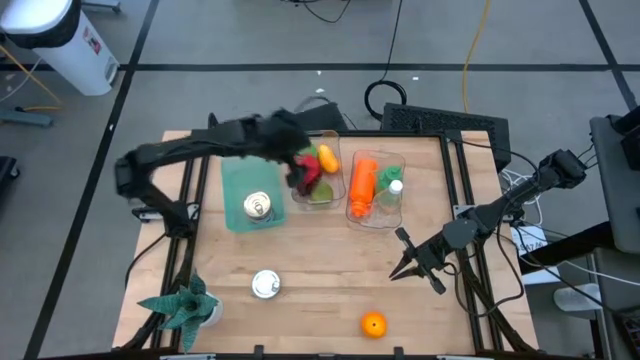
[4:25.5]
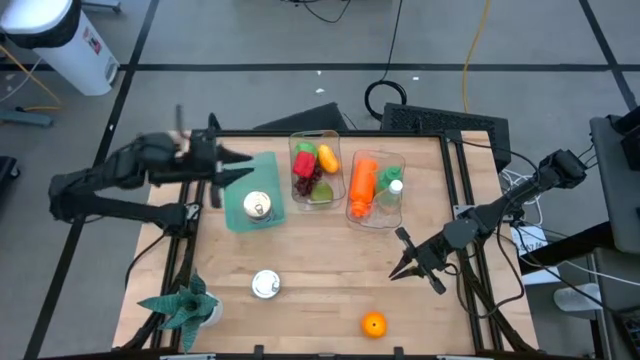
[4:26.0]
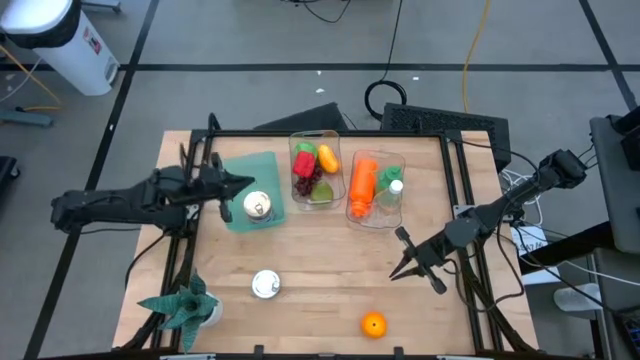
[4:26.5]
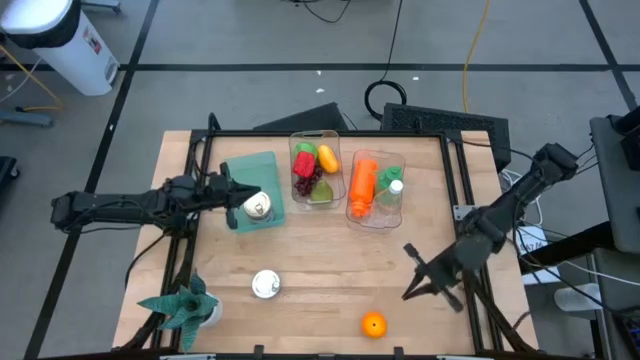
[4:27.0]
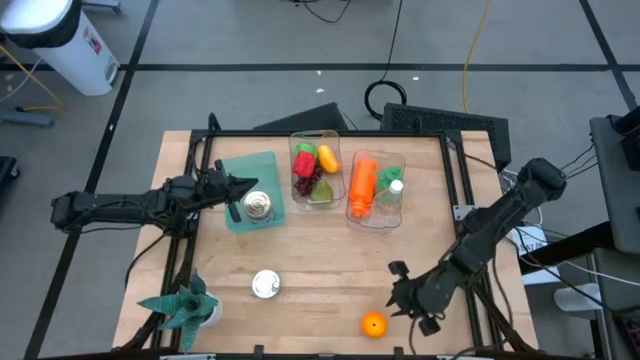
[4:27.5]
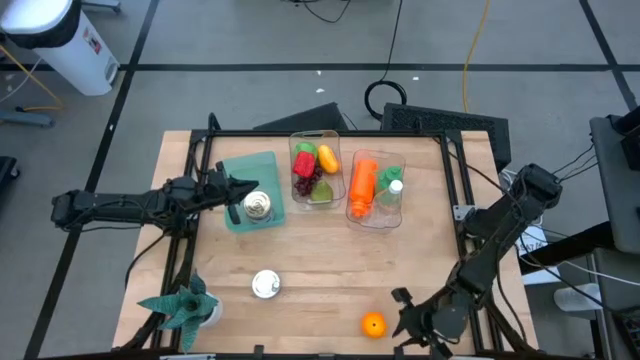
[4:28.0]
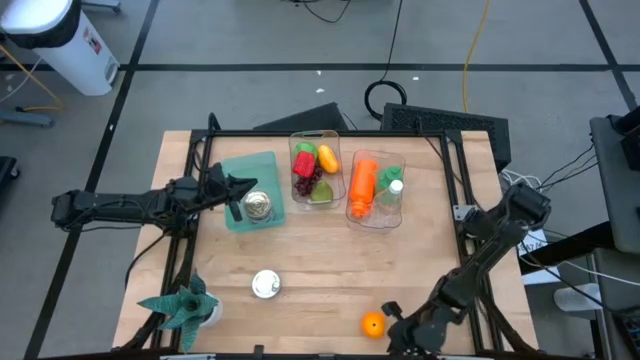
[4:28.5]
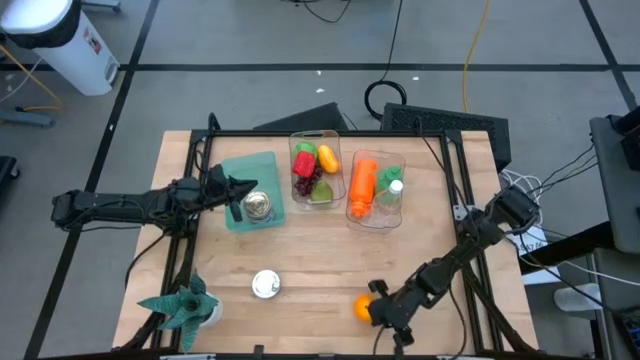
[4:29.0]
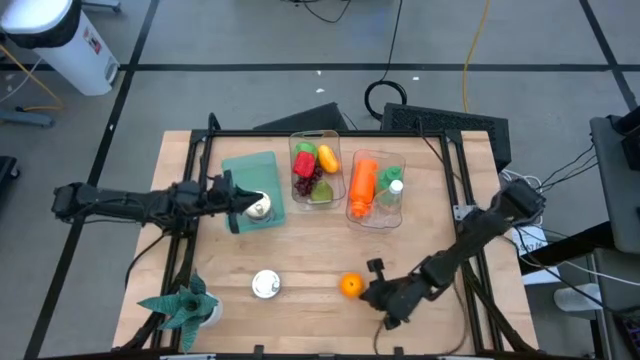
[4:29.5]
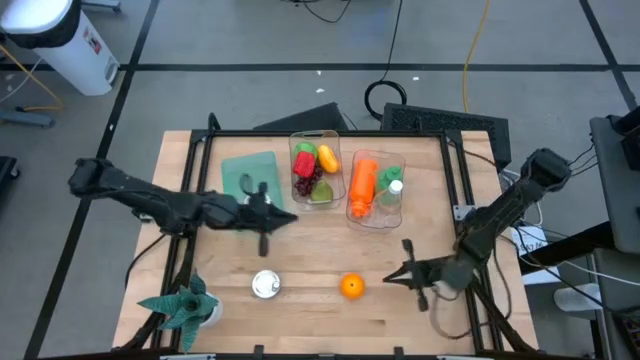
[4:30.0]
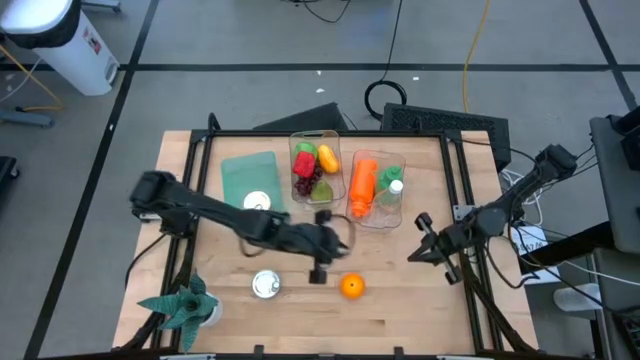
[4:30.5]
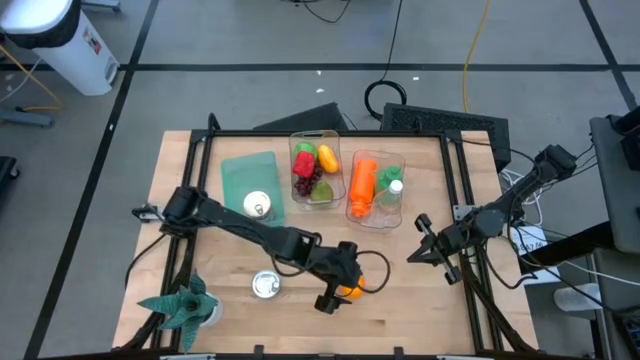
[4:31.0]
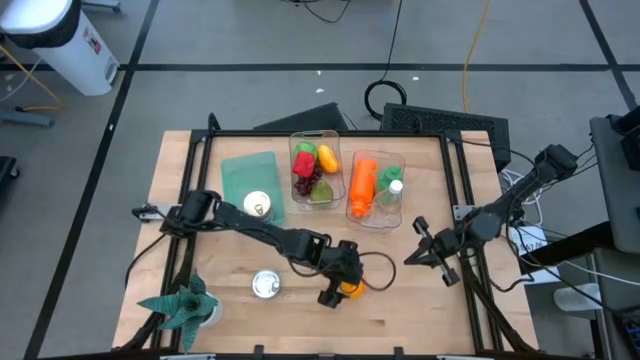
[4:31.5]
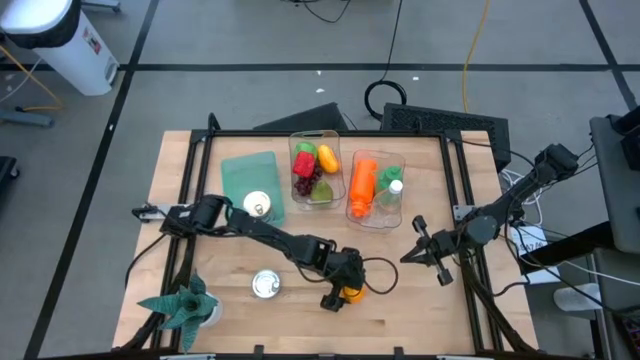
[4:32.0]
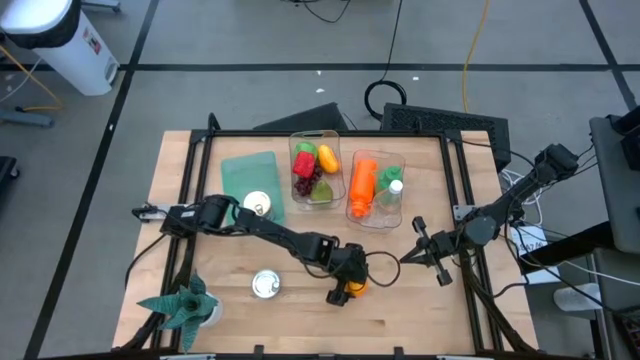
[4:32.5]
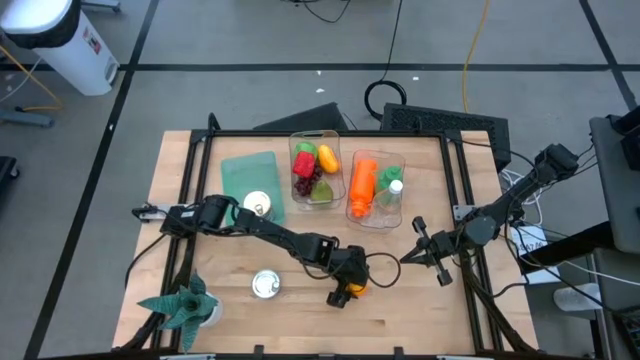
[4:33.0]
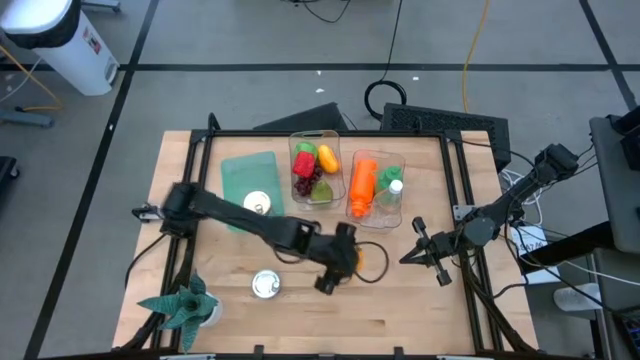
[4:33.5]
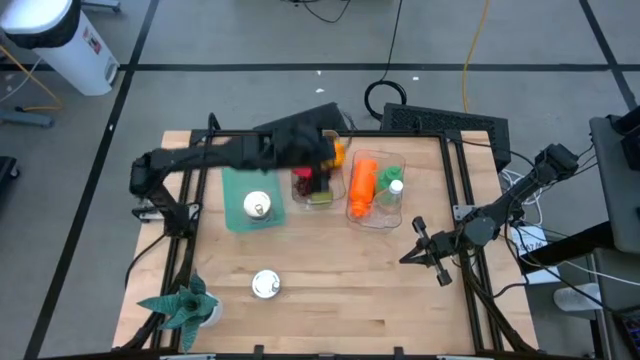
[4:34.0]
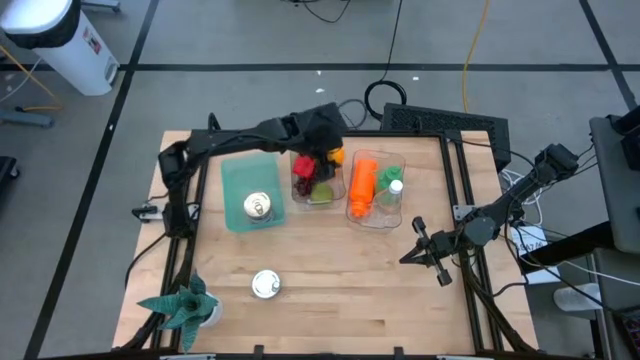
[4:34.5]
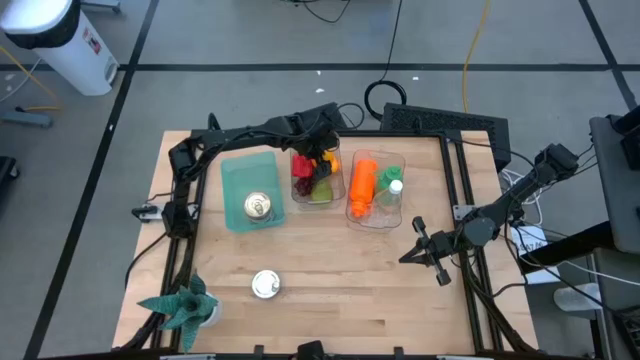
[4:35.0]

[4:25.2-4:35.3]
Task: Pick & Place Food Item
Put the orange into the left transparent bin

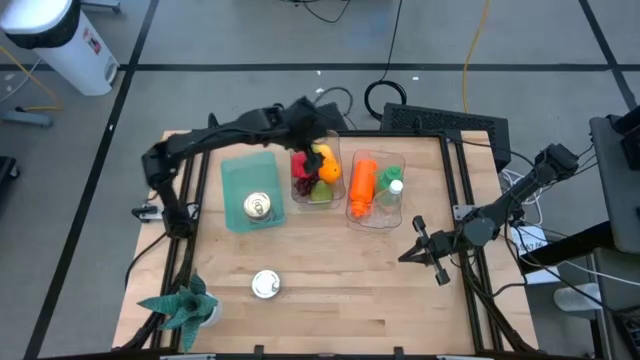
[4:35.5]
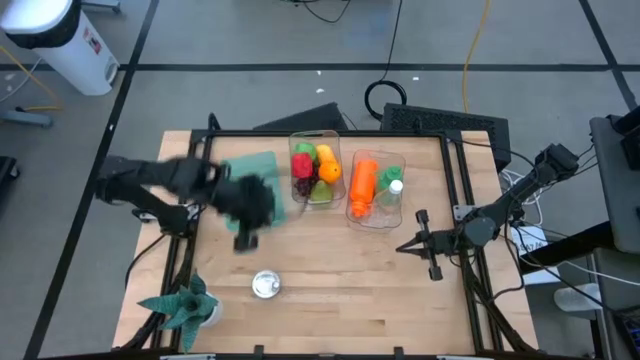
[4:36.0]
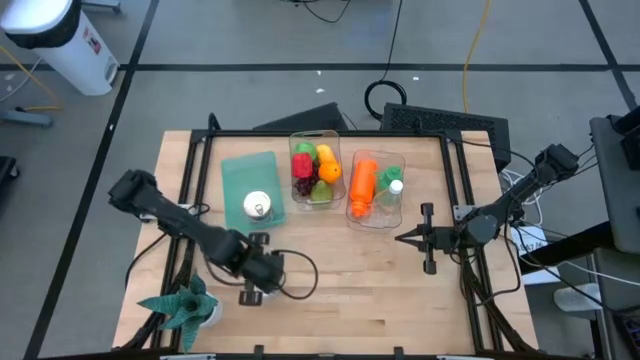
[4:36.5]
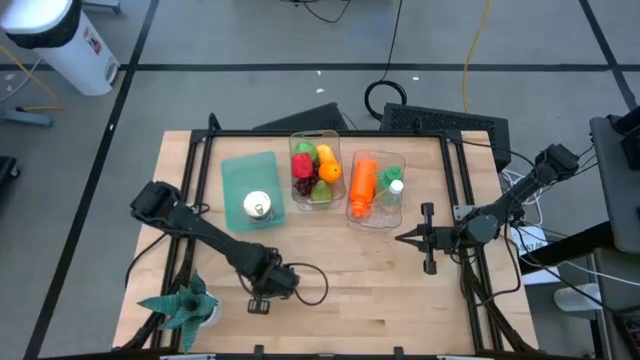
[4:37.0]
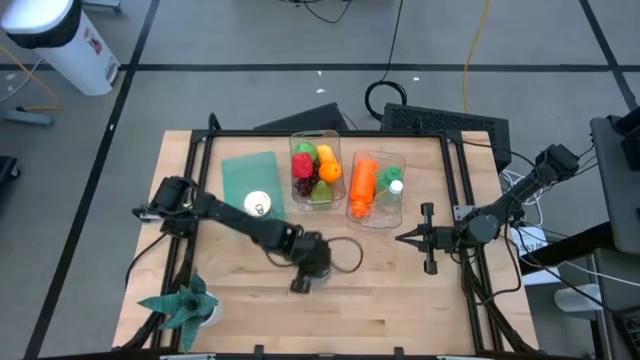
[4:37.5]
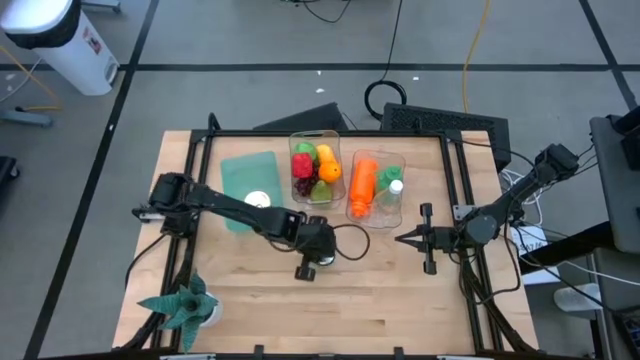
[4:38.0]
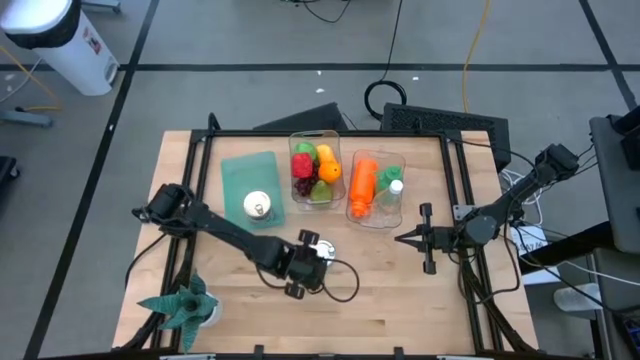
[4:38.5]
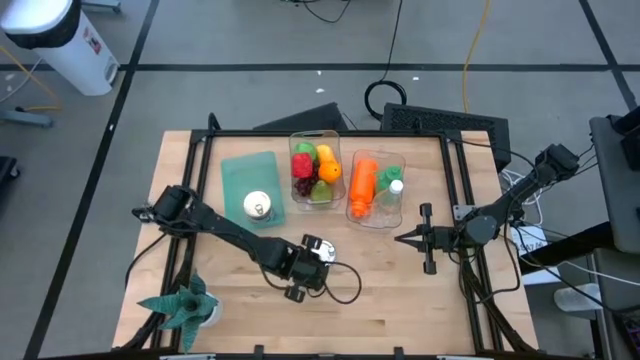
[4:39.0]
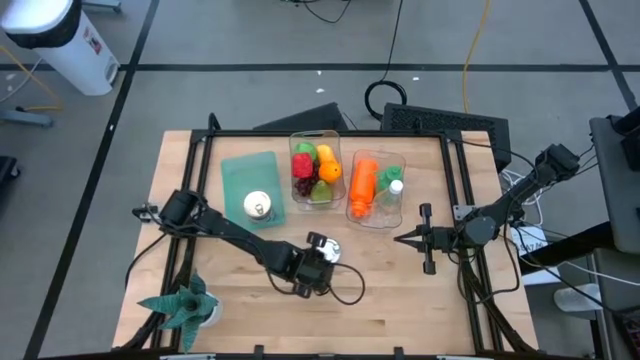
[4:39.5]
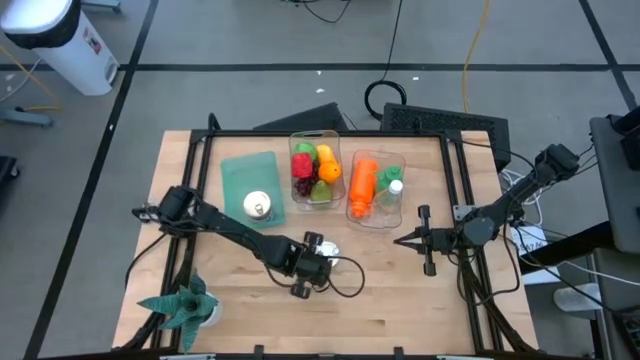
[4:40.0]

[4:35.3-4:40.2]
Put the green tuna can into the green bin

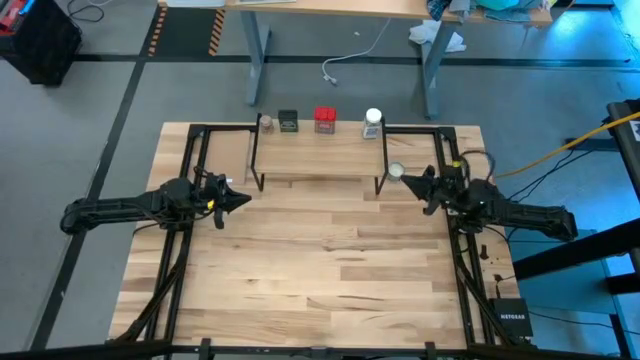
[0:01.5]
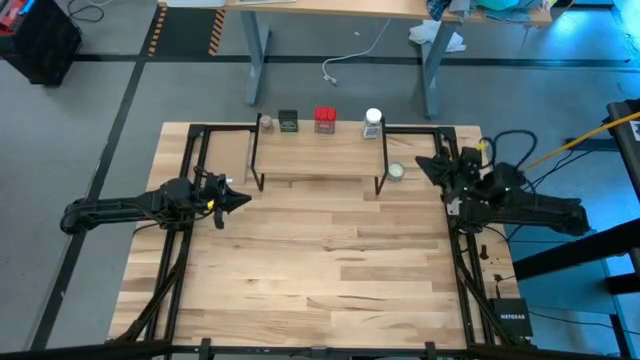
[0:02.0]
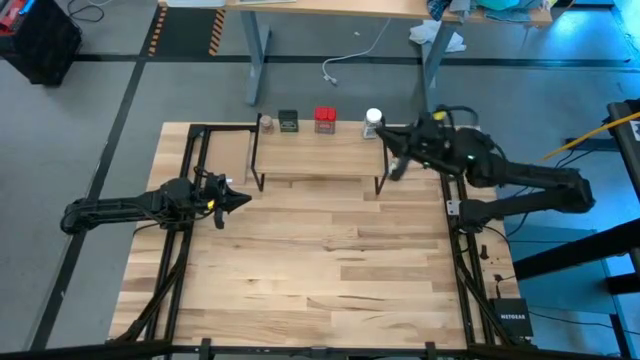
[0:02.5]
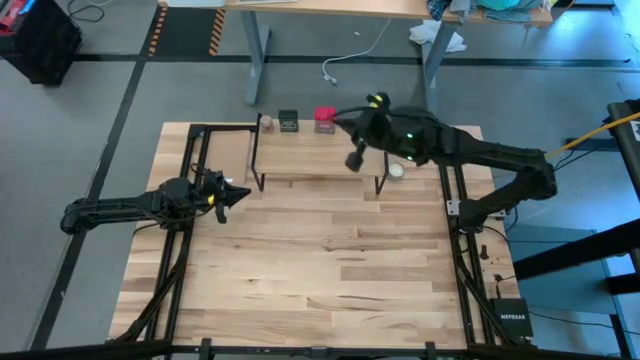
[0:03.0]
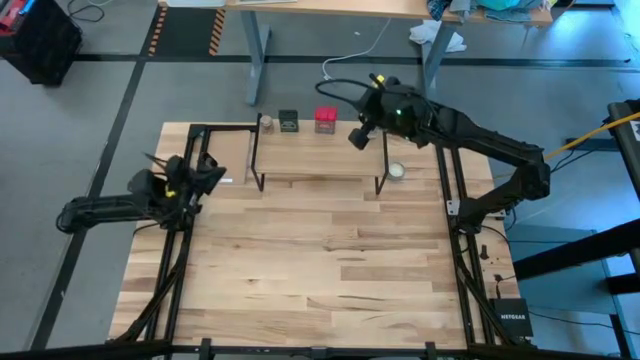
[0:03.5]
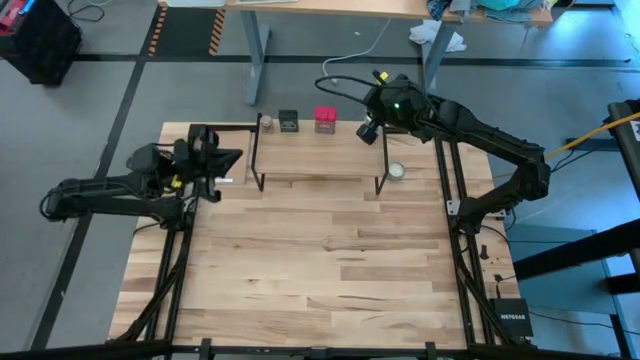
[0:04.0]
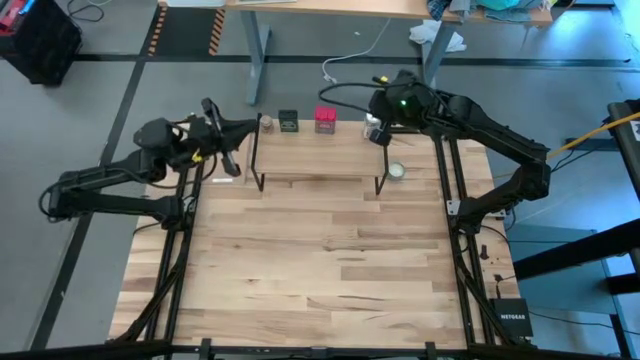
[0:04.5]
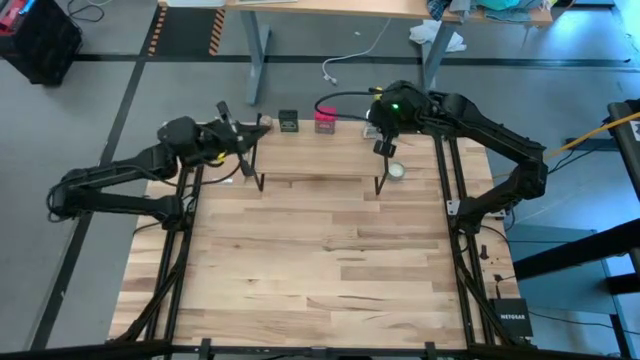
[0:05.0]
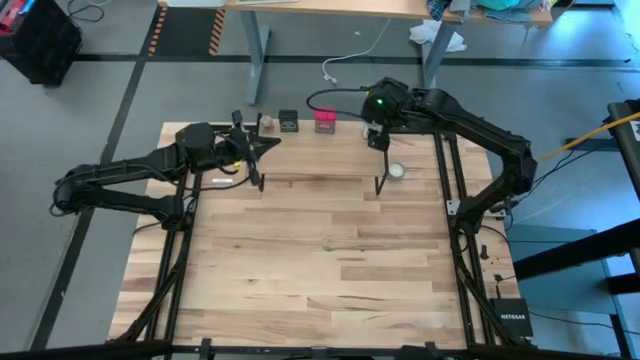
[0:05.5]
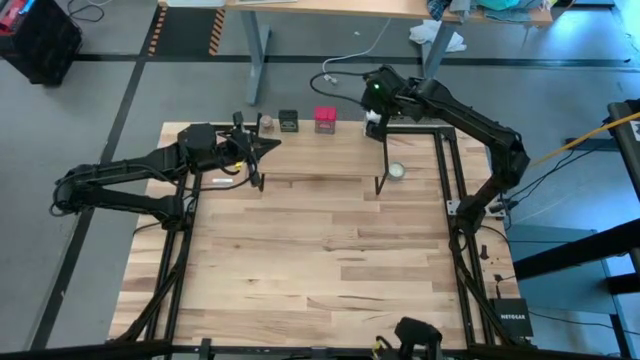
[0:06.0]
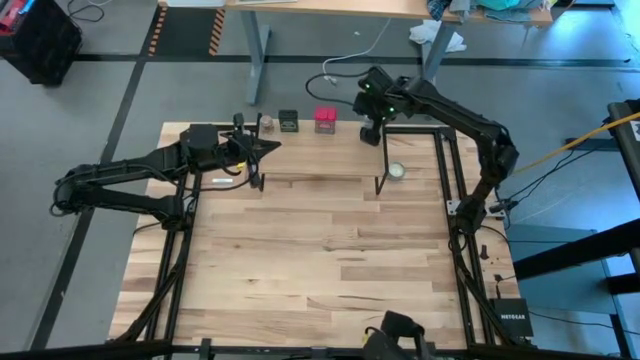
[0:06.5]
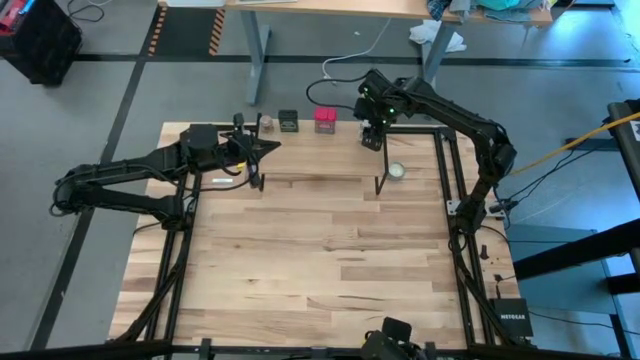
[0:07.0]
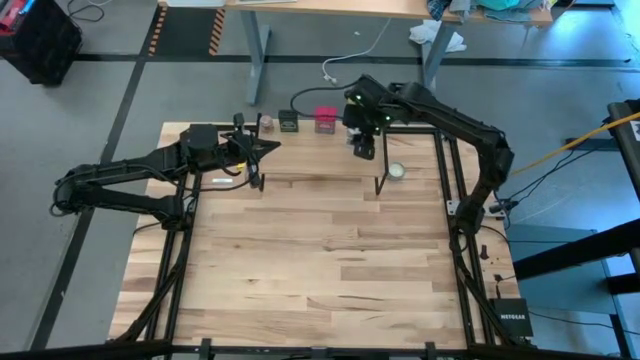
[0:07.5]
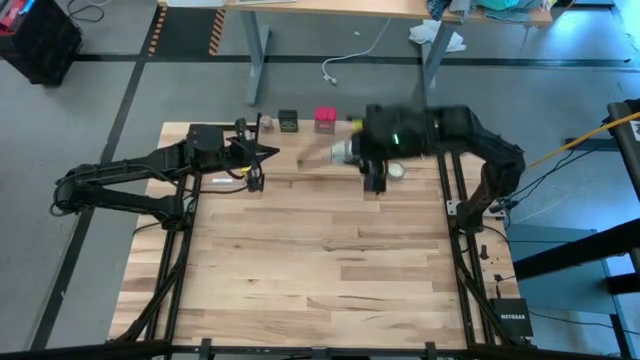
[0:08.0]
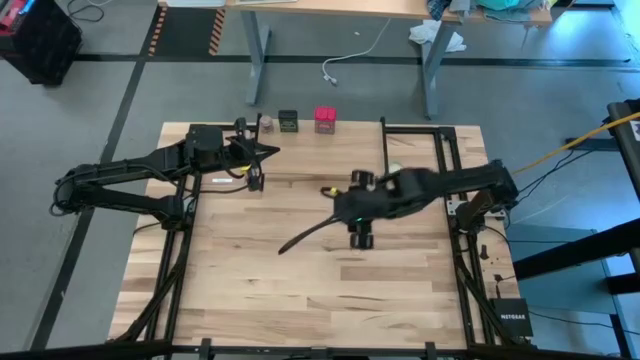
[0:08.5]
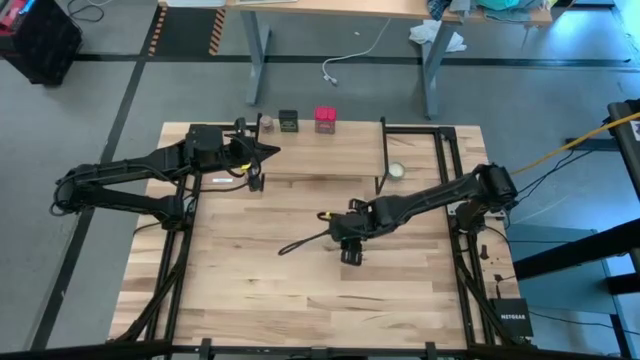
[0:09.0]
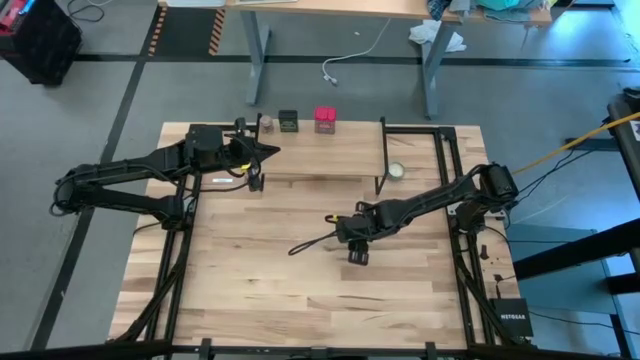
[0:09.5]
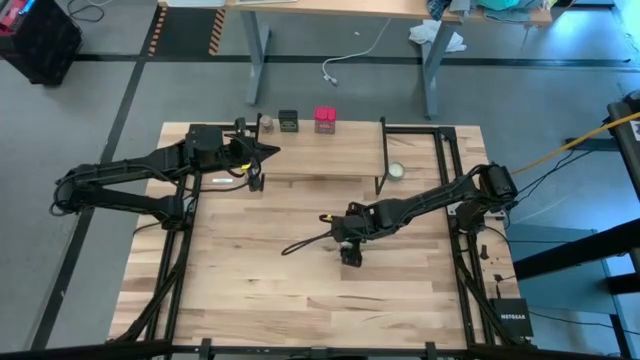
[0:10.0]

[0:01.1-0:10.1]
Task: Shelf spices
Remove the white seasoning bottle from the shelf
